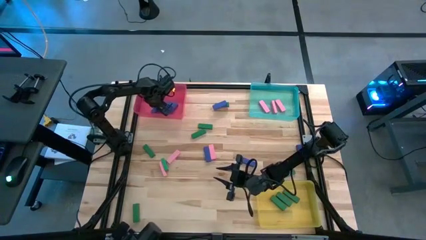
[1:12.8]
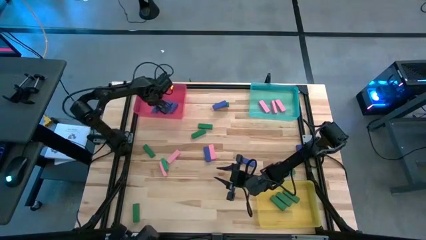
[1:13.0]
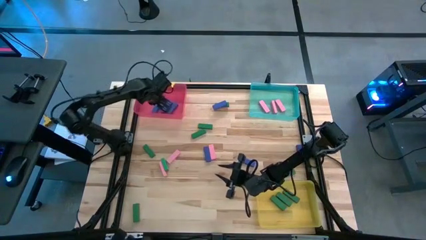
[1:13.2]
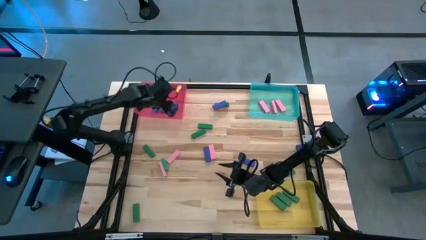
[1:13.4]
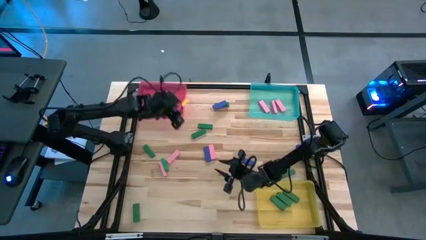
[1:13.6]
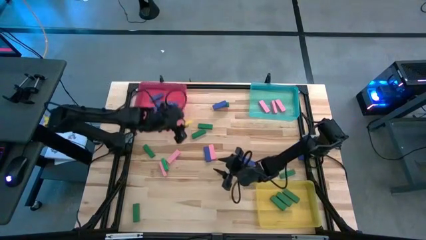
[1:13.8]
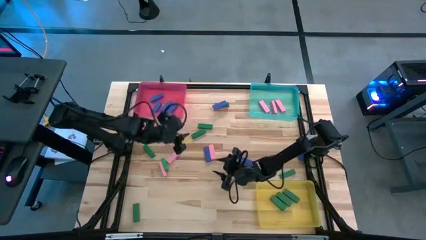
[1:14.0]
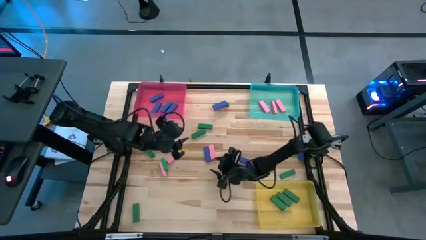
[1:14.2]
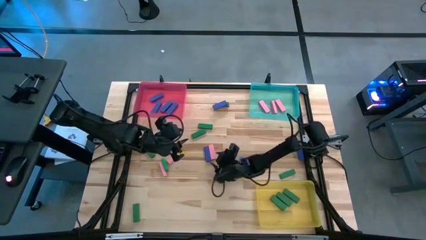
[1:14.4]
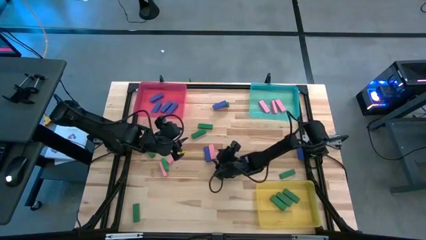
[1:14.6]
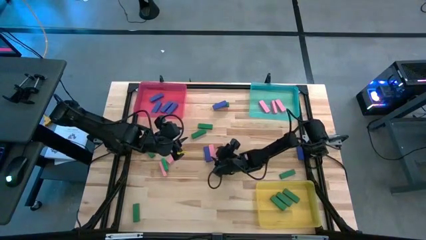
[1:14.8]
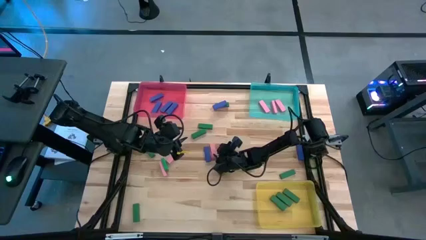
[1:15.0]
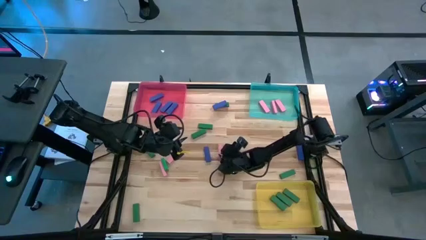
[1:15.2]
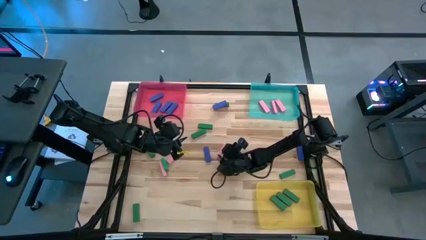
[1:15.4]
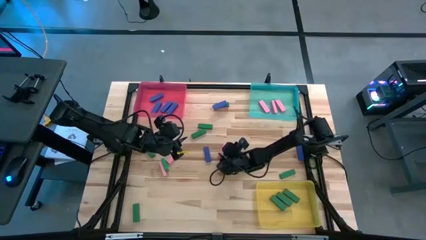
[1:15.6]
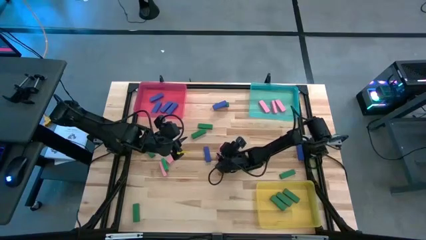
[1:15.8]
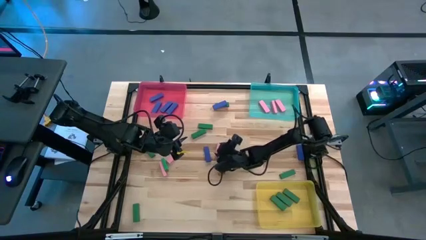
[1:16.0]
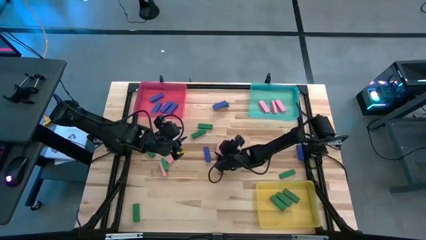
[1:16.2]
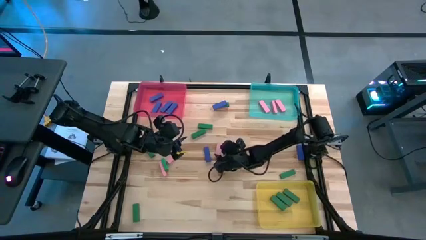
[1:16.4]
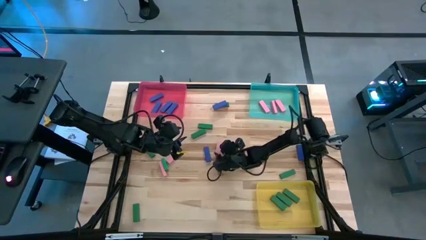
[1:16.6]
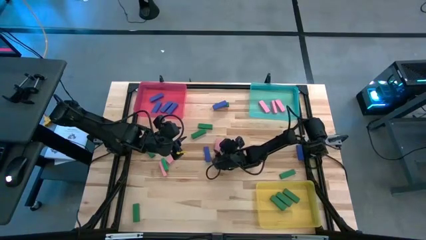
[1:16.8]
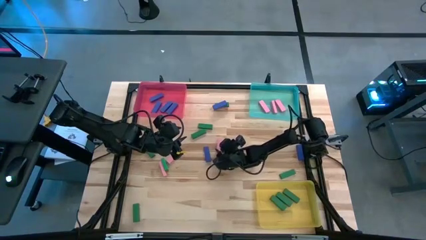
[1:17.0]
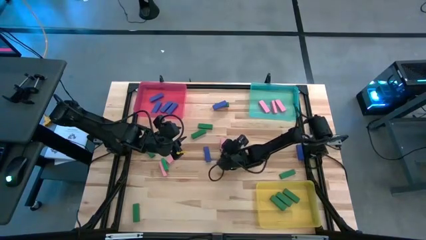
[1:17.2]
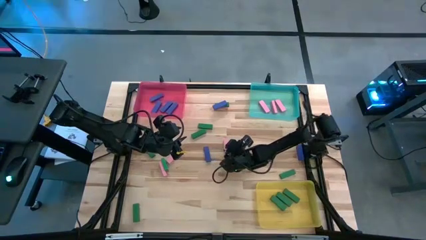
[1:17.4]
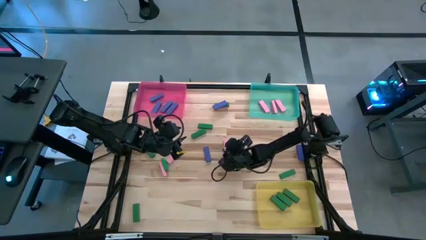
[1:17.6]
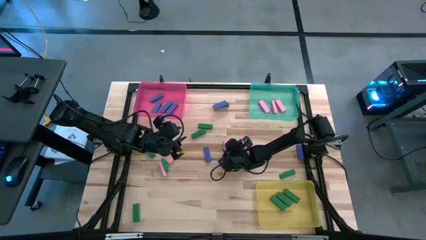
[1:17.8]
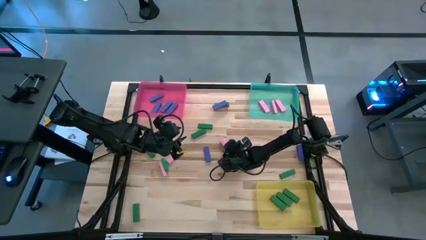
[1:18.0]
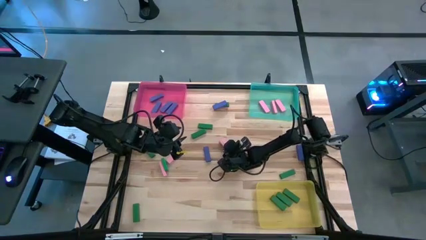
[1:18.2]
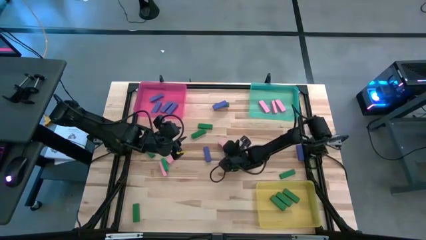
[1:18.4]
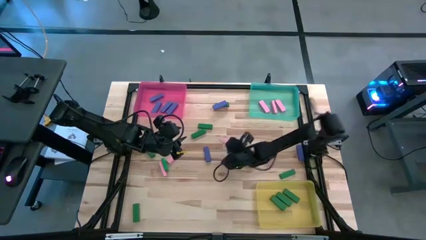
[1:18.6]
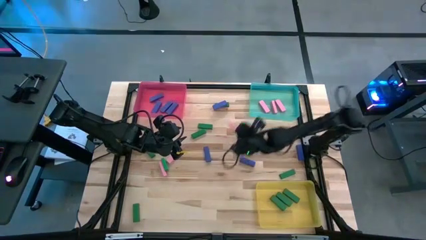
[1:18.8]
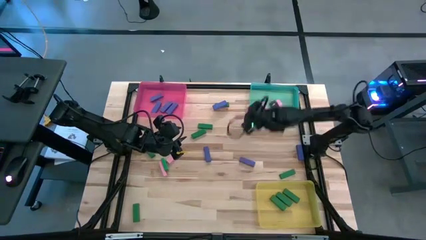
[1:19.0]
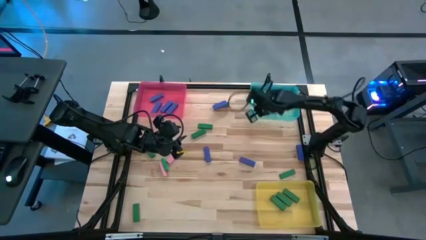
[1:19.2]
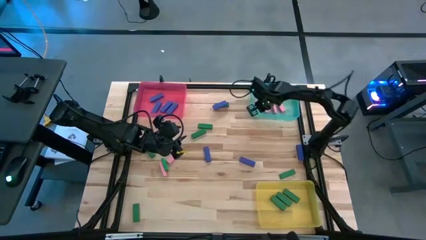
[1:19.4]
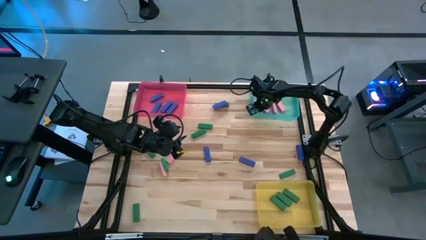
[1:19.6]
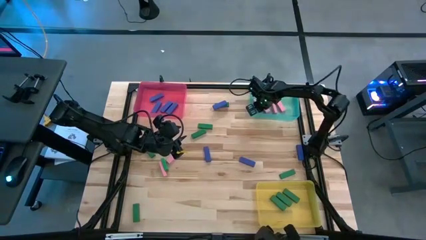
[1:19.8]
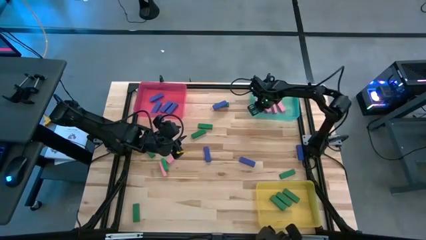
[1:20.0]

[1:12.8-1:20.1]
Task: Sort blocks
Put the pink block into the blue bin

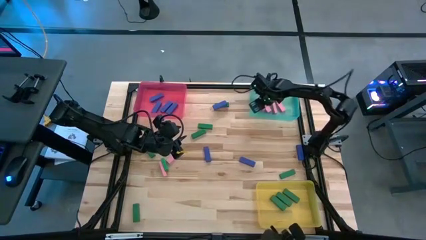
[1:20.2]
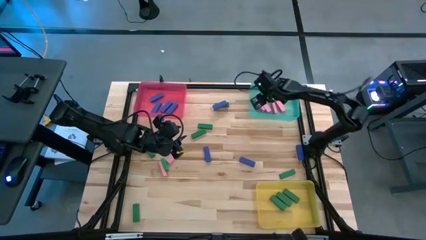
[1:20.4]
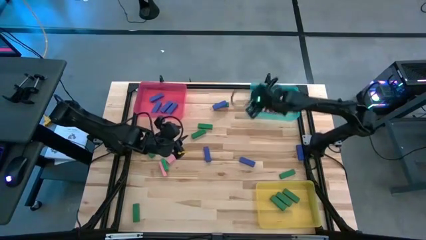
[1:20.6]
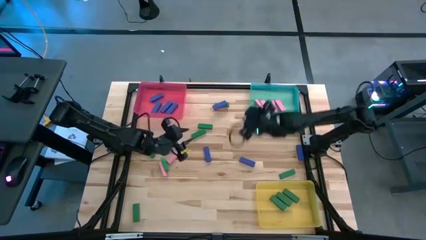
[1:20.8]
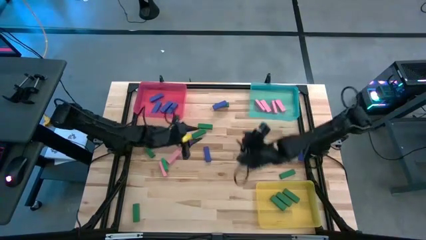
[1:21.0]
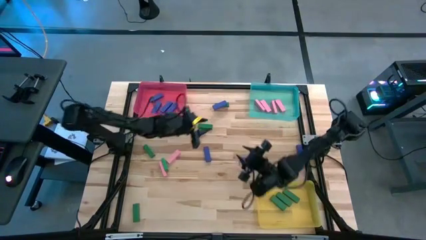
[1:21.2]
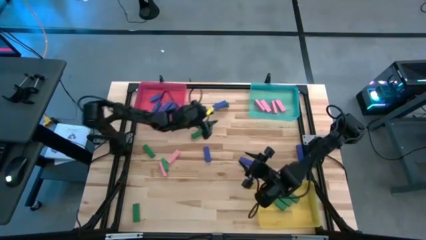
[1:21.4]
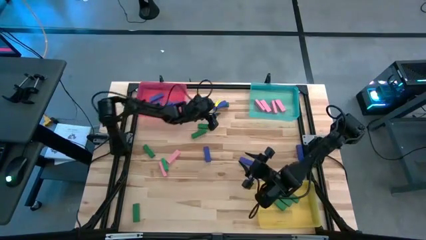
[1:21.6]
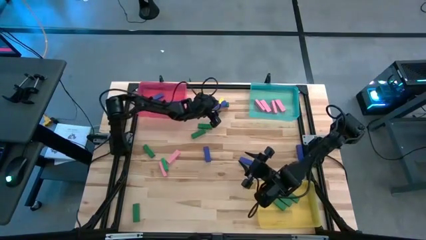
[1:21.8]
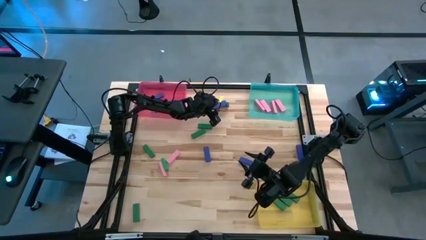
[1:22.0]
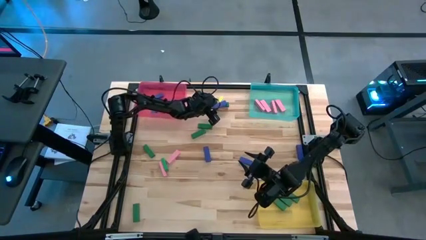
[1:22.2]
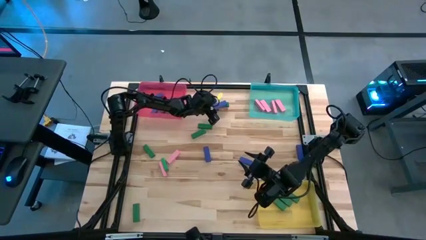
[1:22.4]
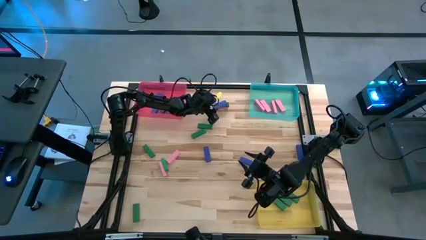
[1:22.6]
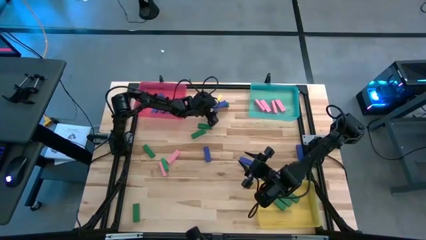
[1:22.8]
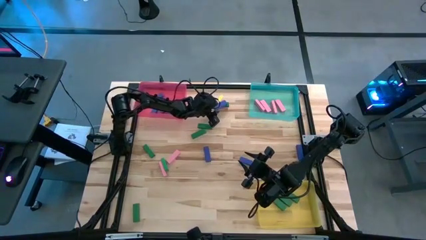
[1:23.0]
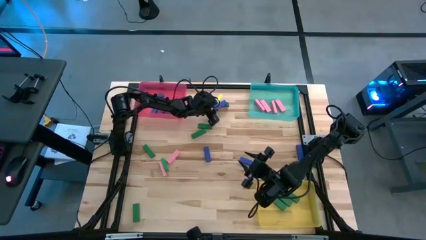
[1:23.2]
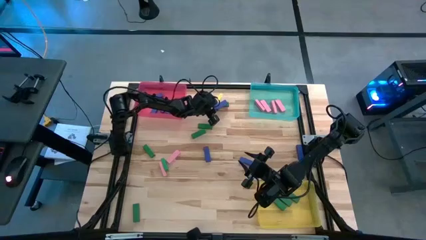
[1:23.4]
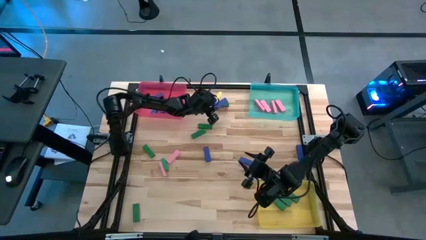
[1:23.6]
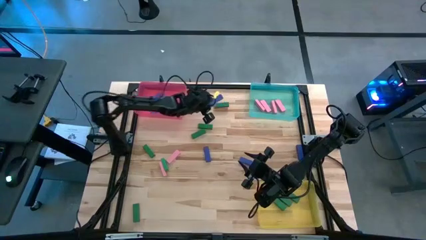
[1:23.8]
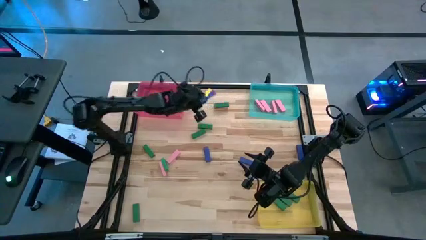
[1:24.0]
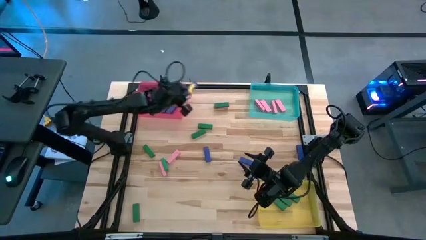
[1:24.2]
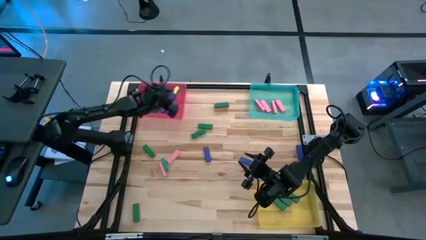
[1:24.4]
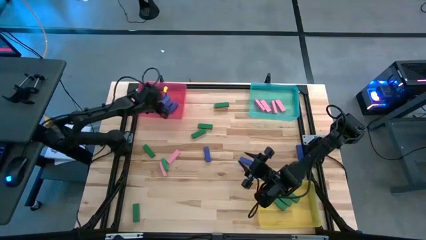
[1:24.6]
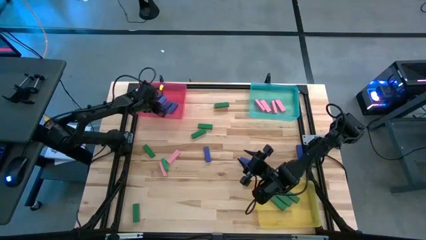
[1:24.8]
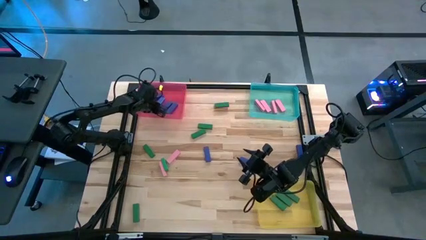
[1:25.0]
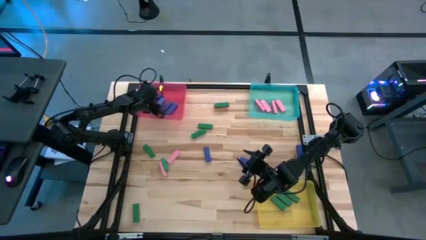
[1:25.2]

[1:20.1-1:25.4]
Put the blue block into the red bin

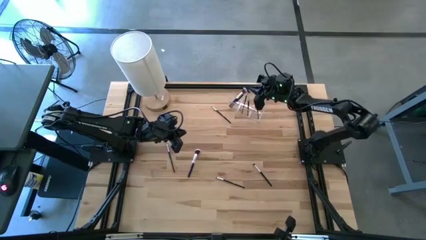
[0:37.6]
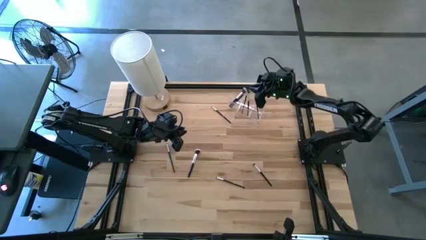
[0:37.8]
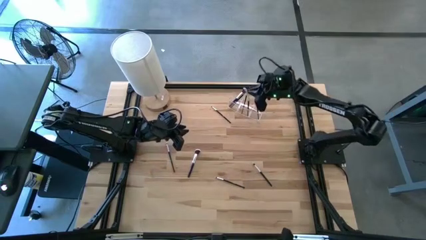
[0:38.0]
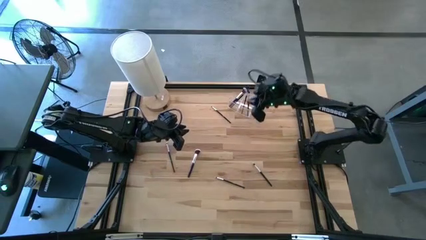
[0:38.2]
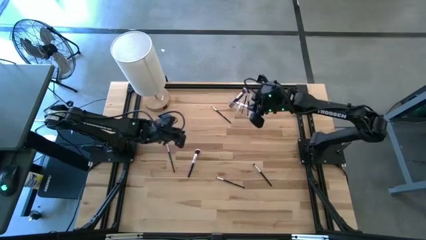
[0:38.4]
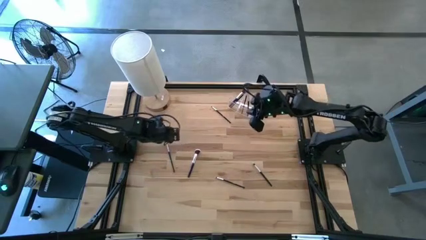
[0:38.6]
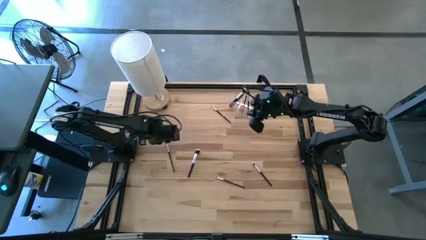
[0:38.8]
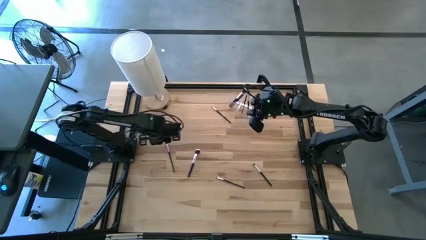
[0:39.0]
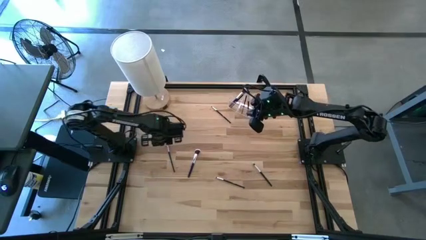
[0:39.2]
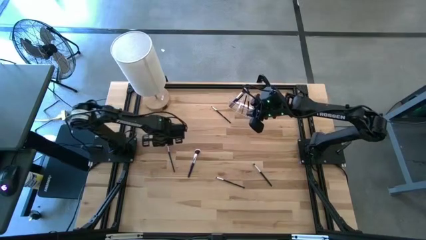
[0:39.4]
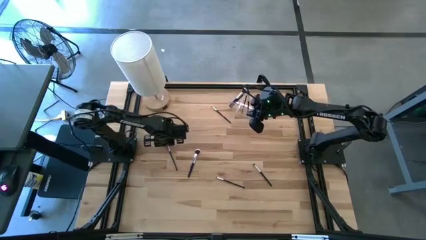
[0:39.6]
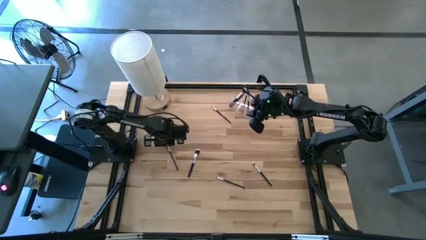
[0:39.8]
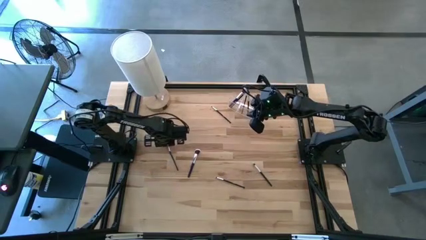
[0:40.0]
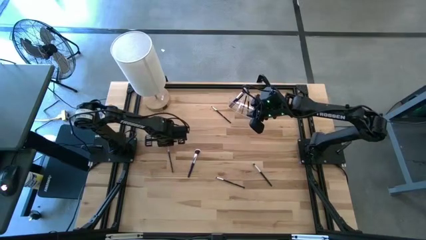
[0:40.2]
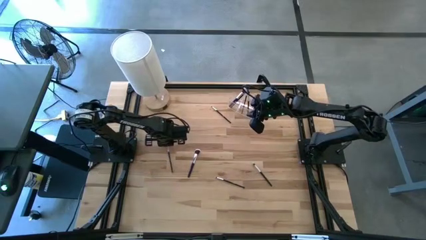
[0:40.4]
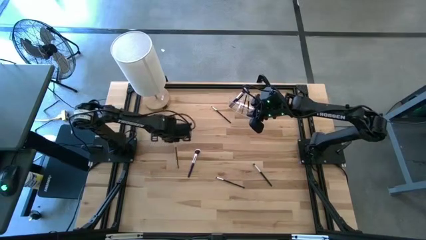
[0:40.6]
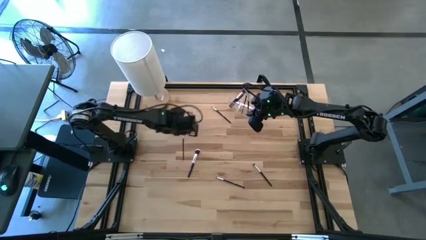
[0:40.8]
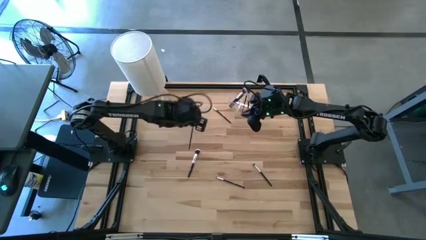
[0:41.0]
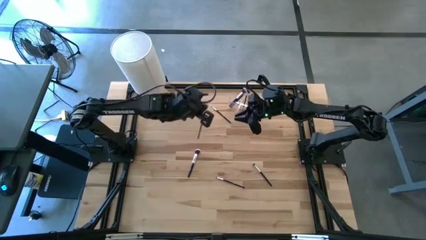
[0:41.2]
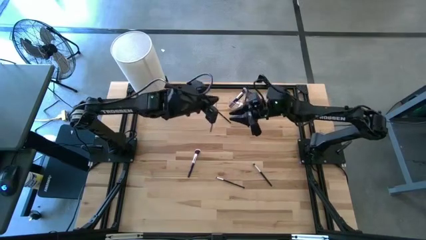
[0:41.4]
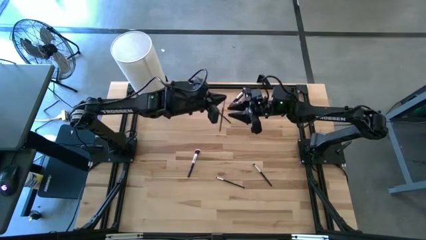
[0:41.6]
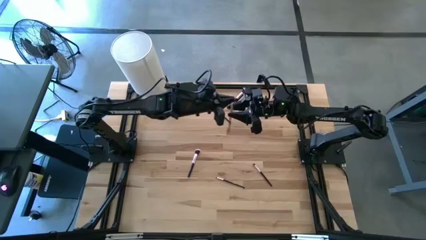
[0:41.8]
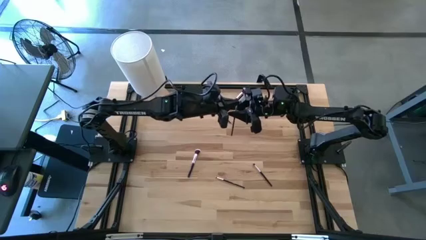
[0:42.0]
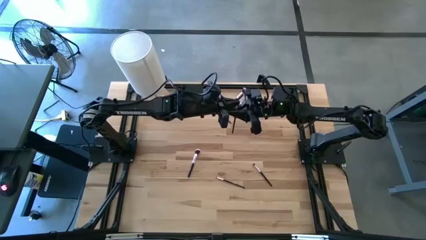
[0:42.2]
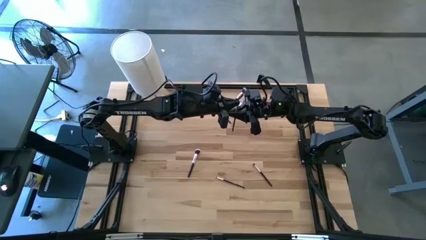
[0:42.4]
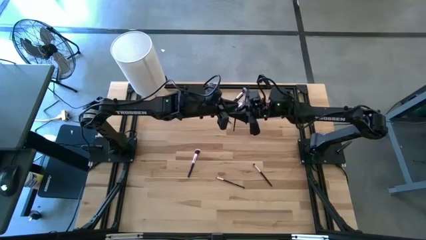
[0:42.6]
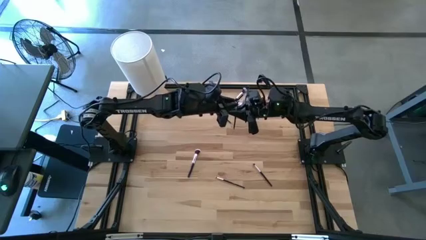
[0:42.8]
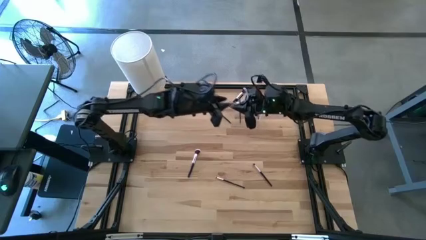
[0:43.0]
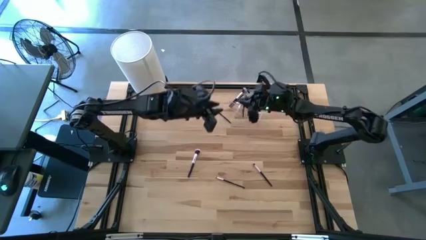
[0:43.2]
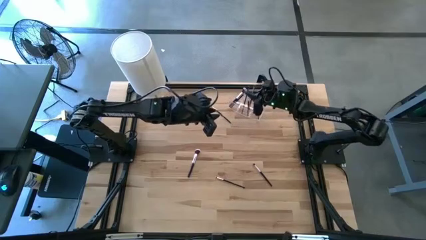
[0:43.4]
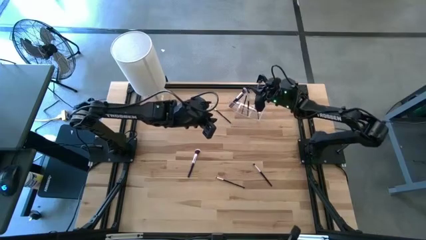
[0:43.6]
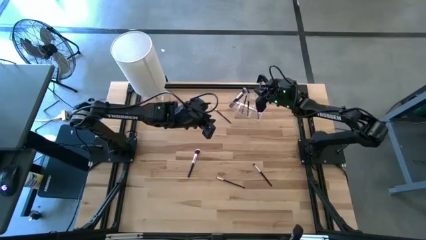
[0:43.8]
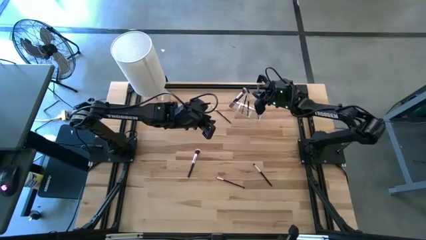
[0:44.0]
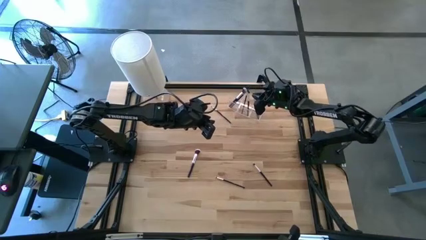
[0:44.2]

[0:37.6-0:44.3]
Task: Pick & Place Makeup Brushes
Put the black makeup brush into the transparent organizer
